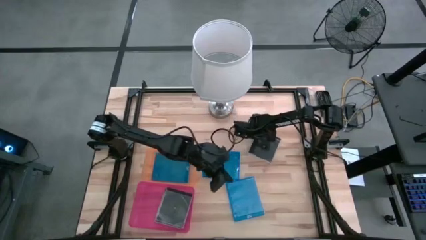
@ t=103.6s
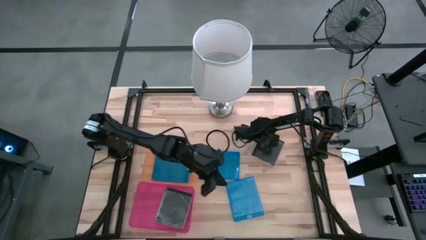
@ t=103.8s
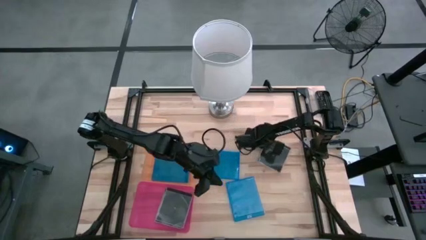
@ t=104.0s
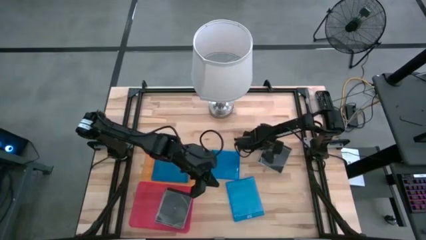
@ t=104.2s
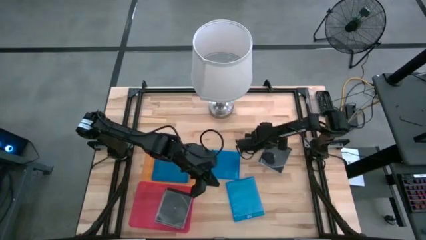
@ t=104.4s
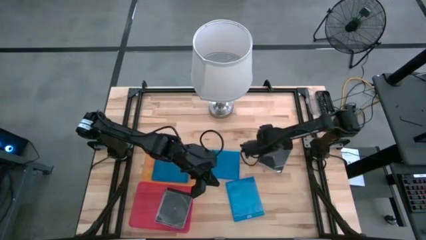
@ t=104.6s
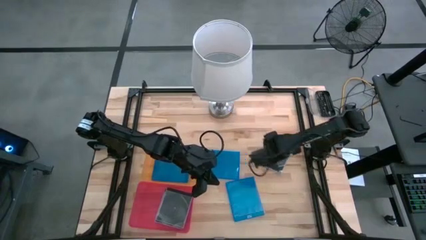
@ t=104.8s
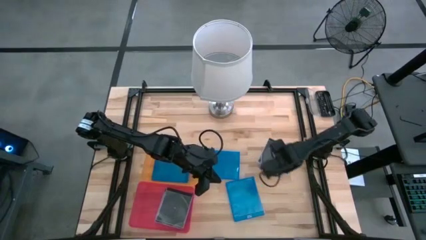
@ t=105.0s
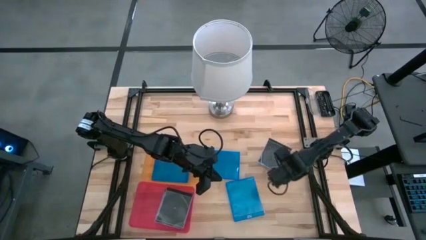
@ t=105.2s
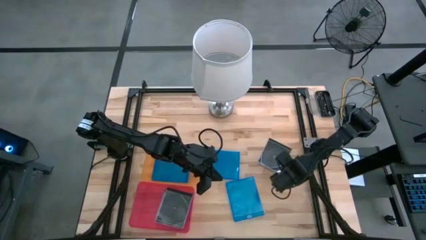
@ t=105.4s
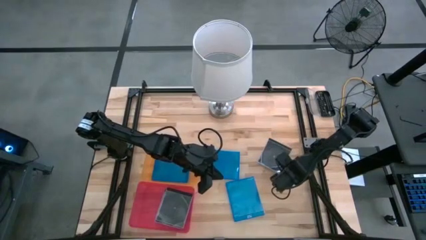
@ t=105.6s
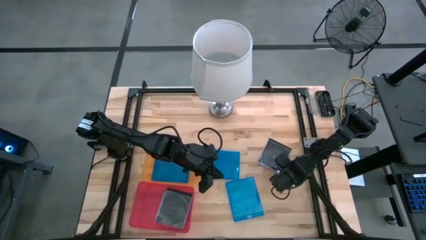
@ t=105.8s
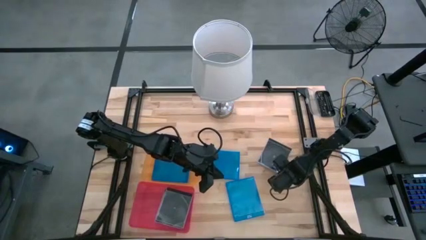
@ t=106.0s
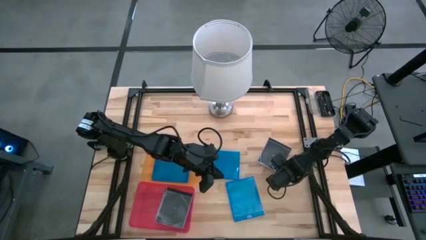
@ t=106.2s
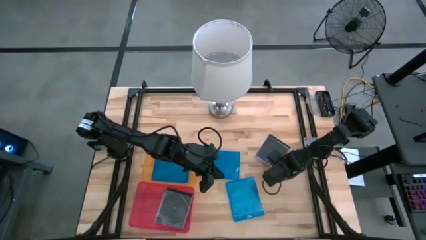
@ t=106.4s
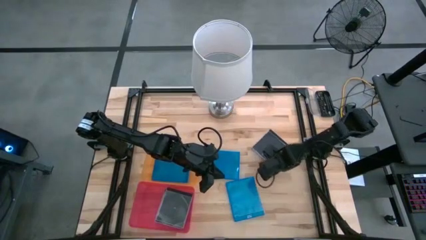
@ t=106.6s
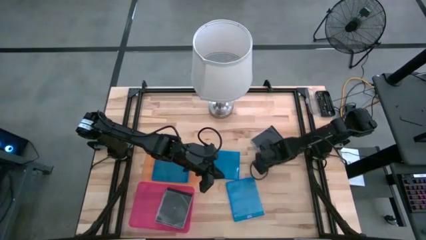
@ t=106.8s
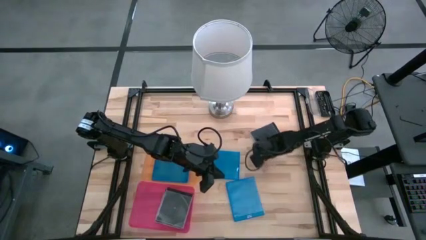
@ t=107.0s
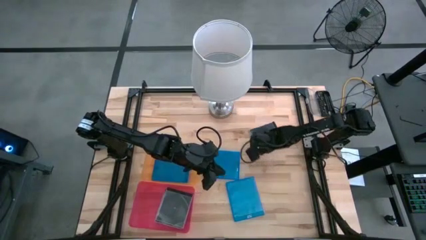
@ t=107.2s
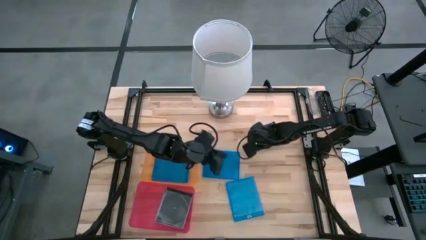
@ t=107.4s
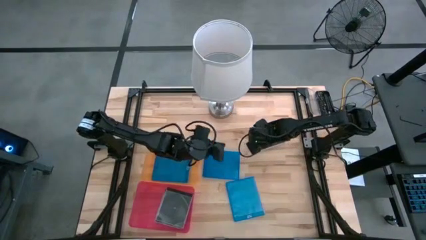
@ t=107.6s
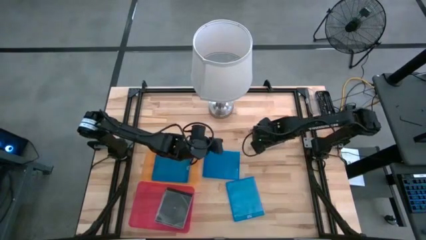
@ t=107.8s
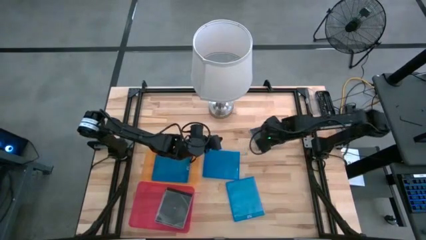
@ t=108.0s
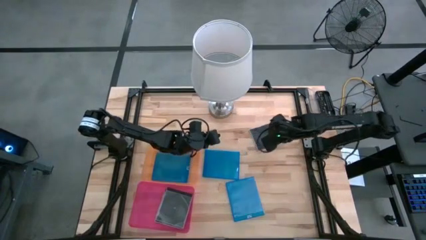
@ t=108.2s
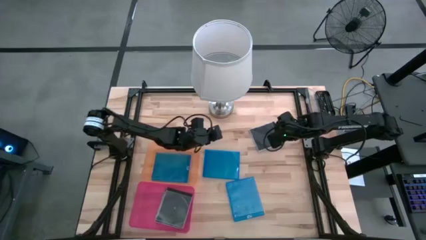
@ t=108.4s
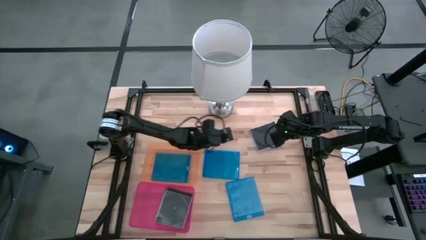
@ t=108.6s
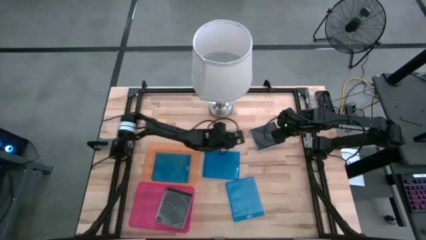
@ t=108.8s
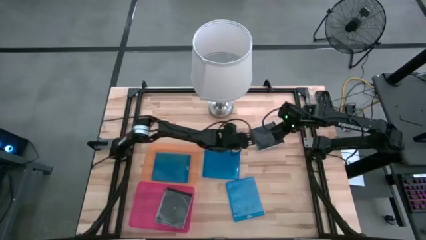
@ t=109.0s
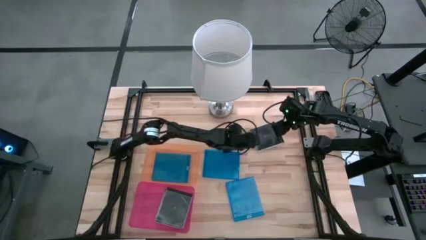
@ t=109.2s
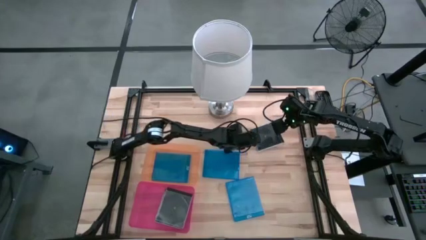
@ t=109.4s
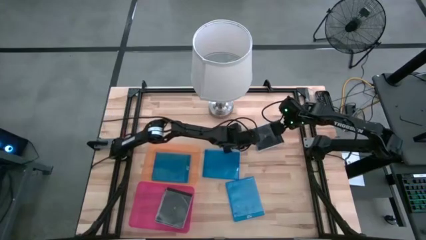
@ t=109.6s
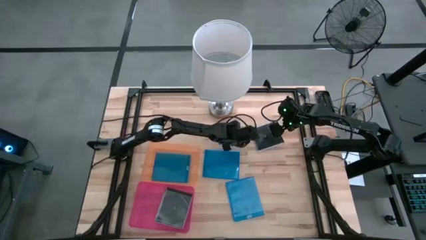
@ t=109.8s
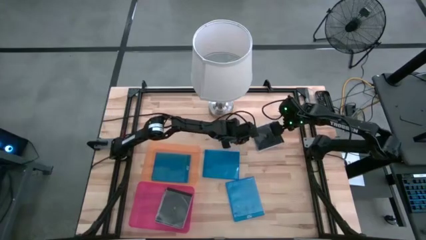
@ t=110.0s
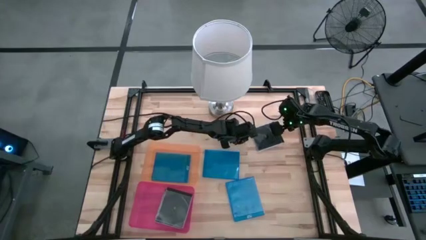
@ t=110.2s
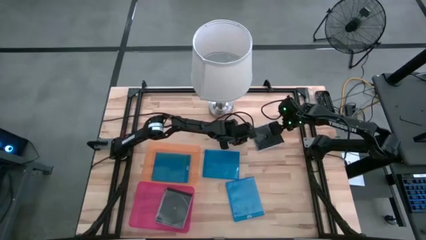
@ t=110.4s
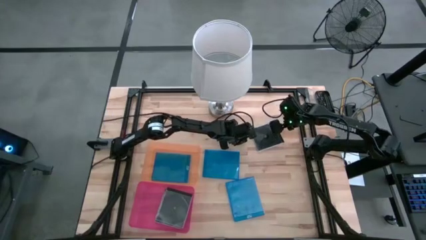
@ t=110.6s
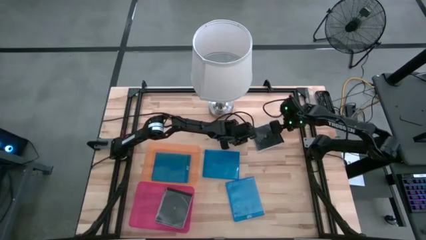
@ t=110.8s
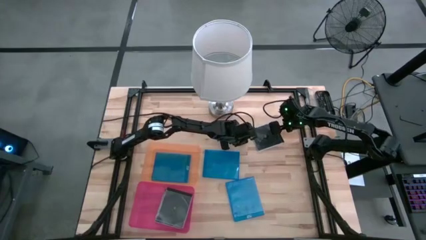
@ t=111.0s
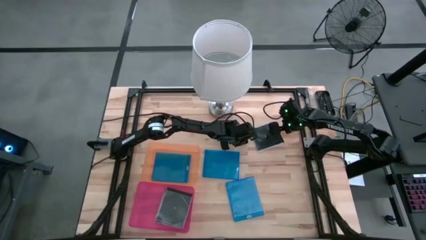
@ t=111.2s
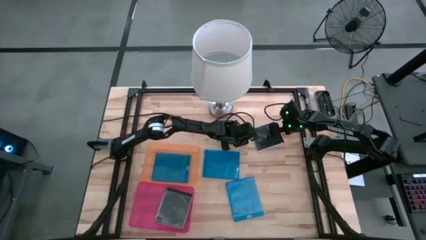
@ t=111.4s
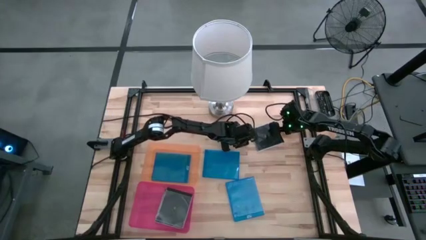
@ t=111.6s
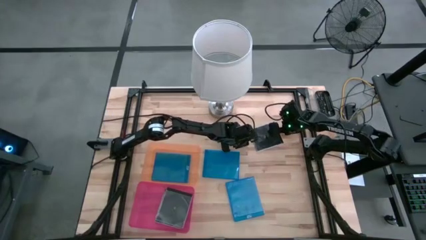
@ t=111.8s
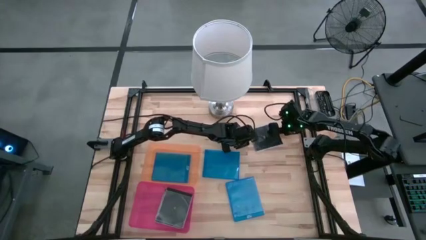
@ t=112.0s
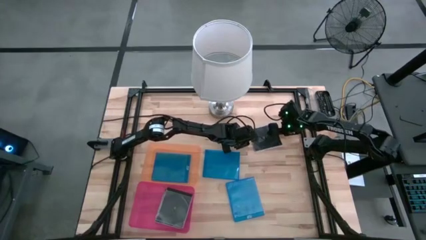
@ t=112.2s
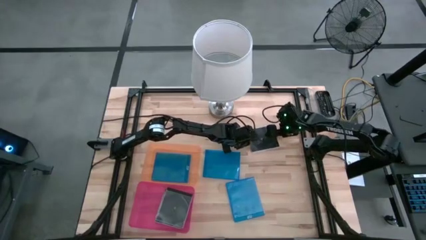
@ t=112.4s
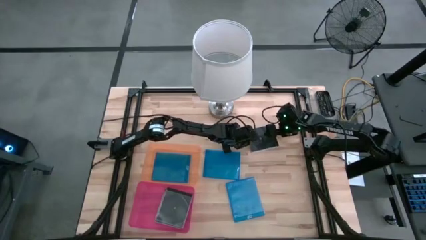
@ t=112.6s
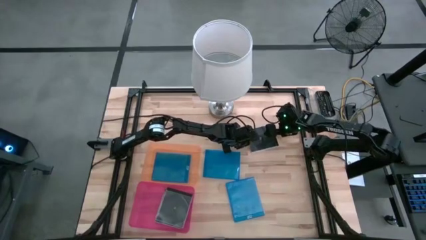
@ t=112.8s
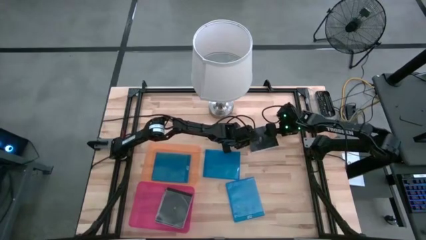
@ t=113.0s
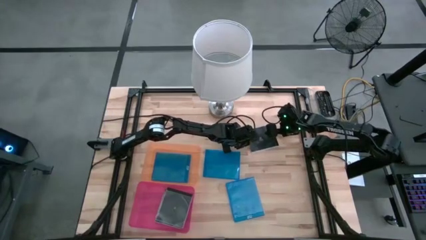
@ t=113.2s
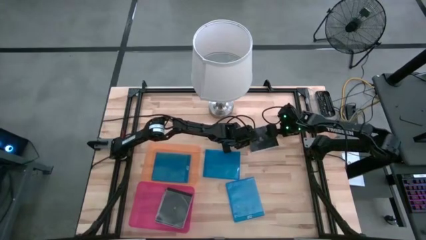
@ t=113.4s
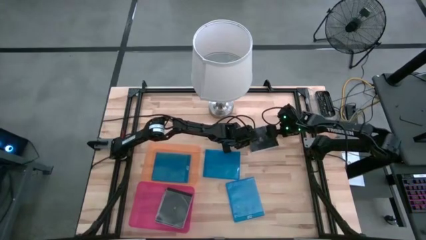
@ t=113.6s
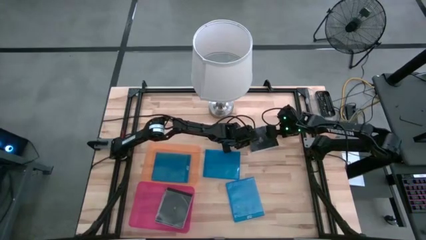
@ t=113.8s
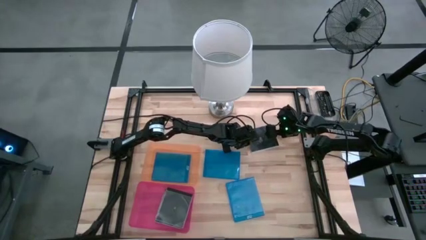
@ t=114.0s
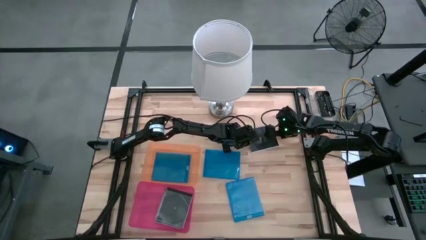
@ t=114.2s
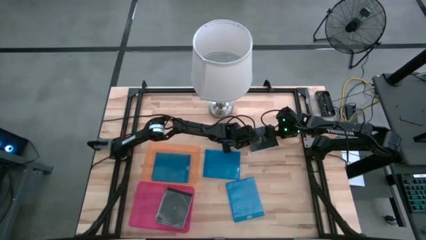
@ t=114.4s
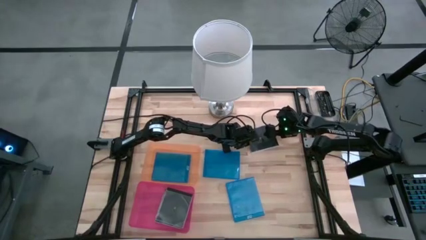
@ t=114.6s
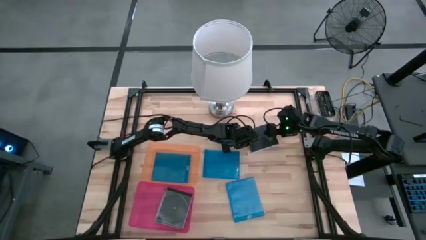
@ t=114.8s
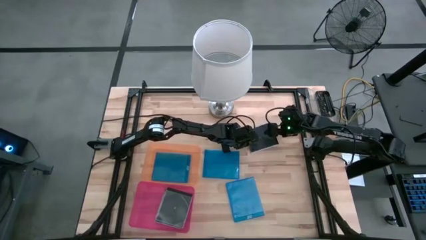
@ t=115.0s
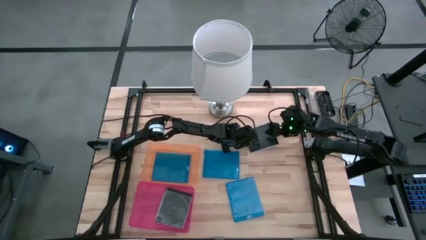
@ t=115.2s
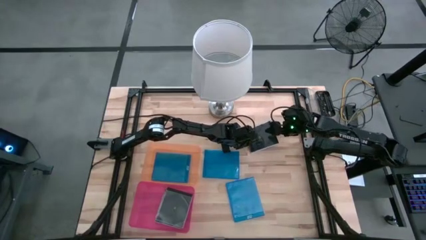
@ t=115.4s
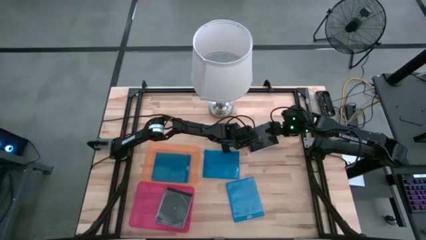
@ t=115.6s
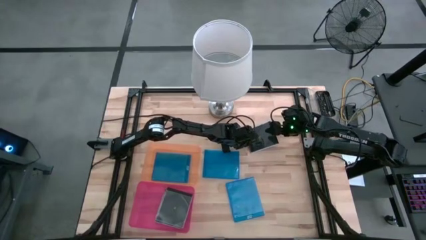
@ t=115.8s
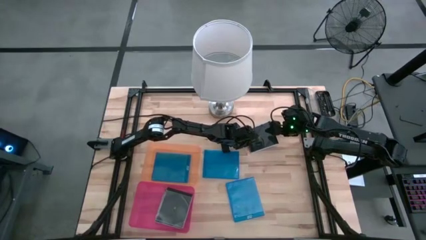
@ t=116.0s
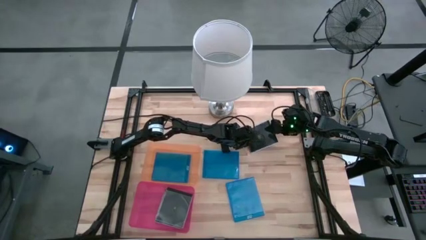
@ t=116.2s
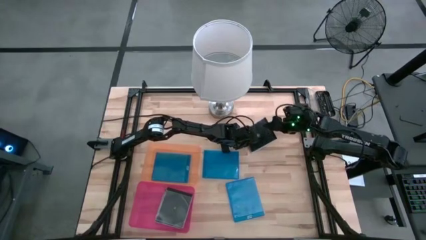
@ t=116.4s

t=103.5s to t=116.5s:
Task: Pick & place jewel cases by type
Put the black CD case into the pink bin
